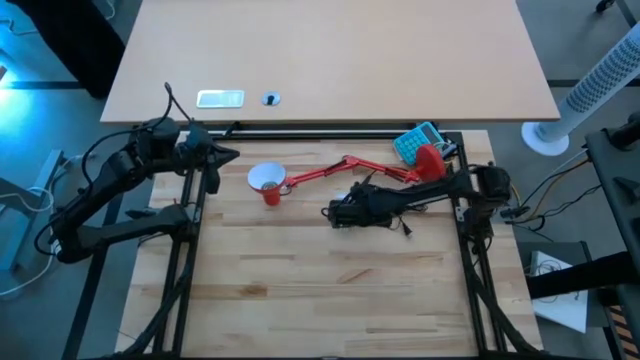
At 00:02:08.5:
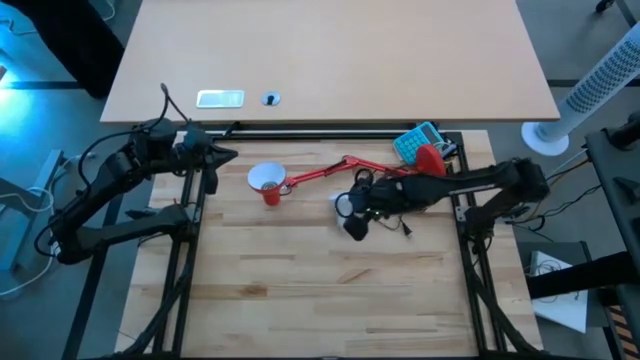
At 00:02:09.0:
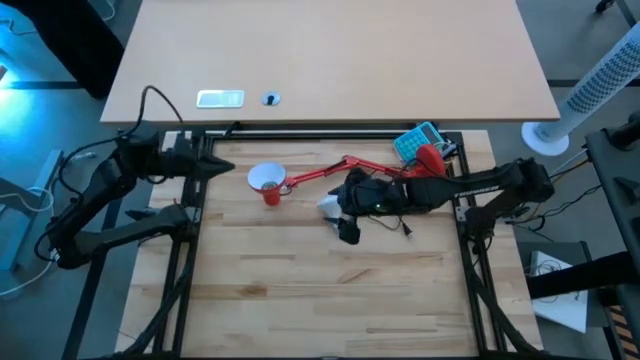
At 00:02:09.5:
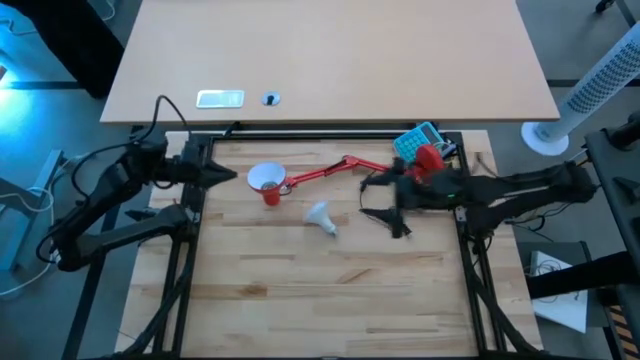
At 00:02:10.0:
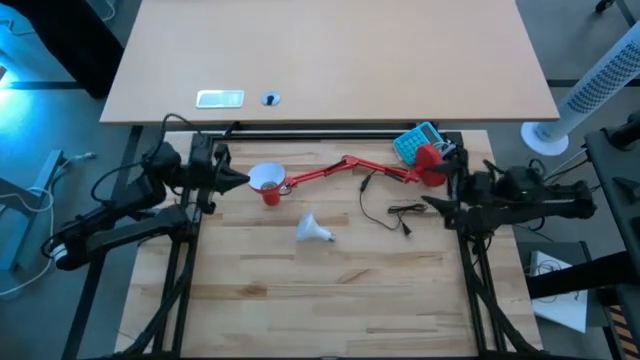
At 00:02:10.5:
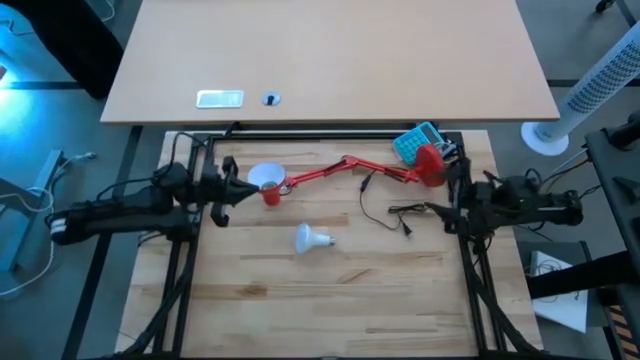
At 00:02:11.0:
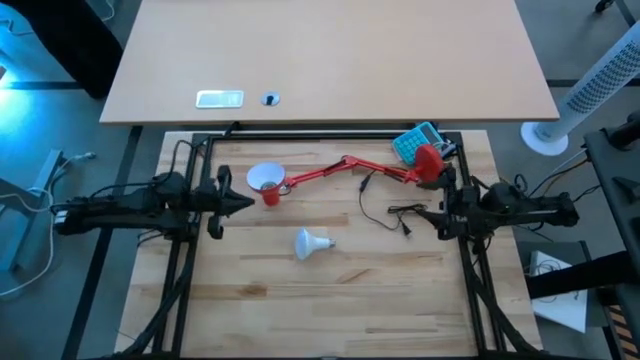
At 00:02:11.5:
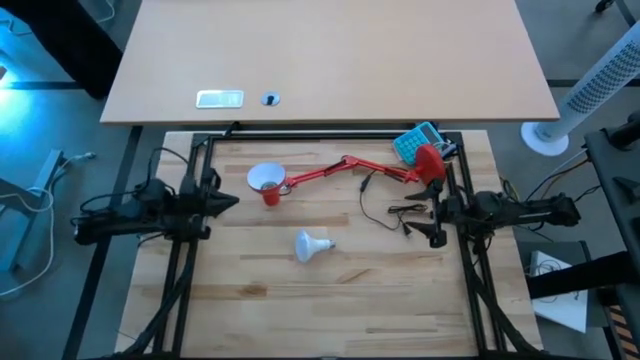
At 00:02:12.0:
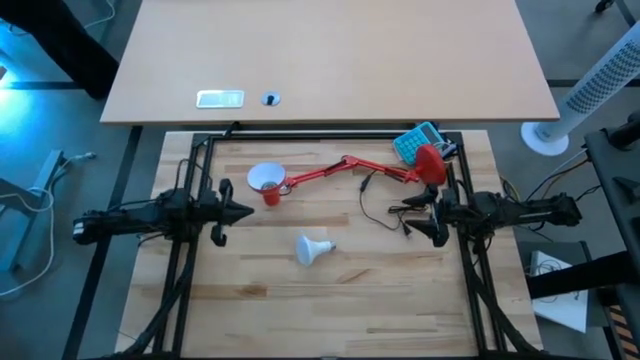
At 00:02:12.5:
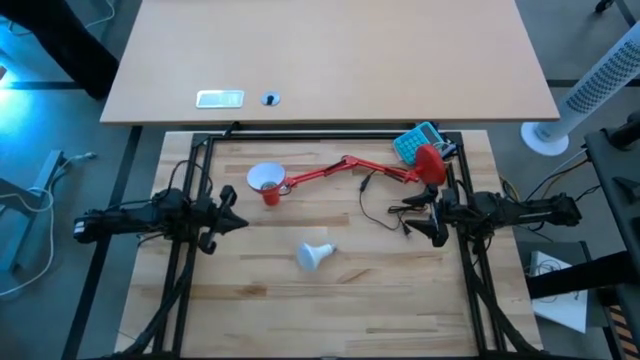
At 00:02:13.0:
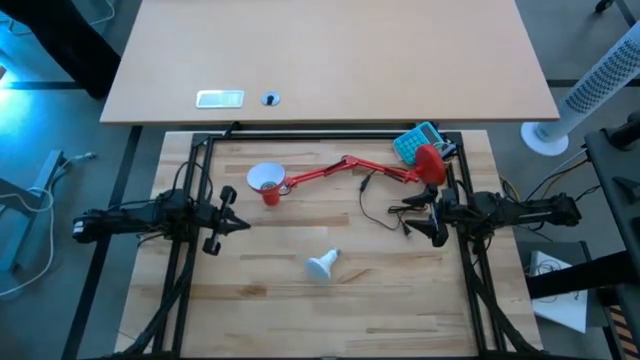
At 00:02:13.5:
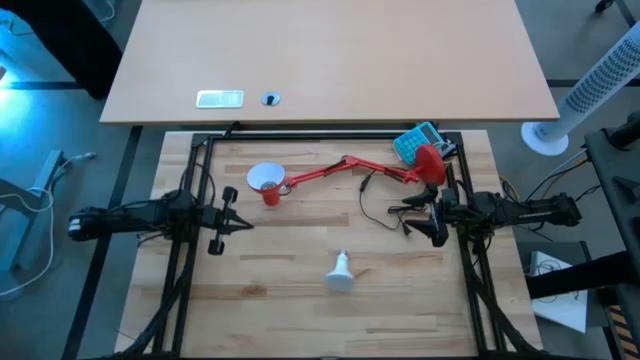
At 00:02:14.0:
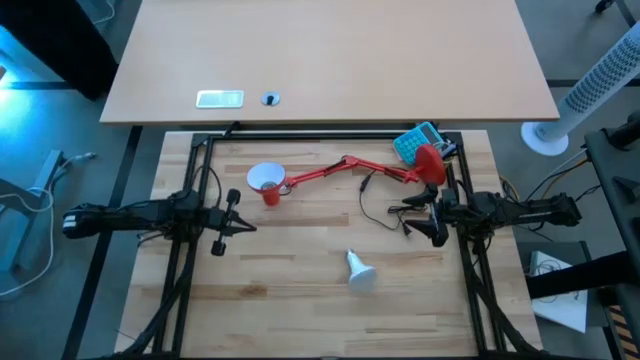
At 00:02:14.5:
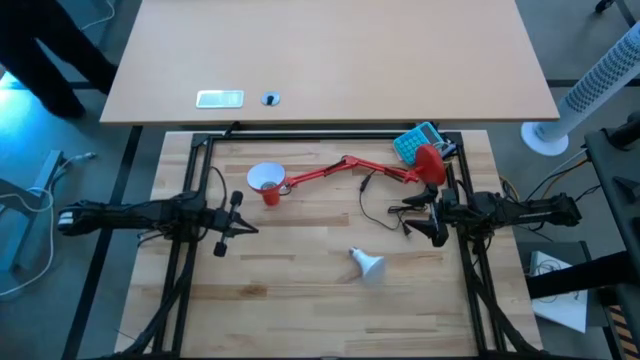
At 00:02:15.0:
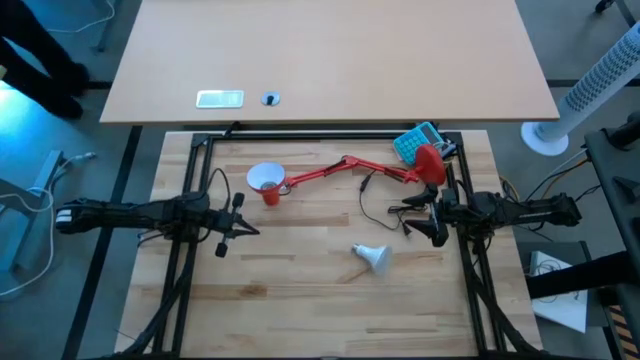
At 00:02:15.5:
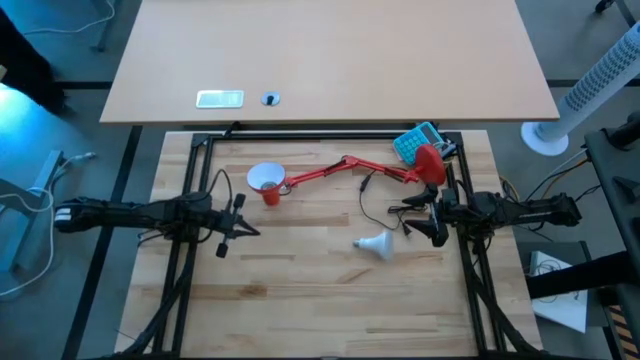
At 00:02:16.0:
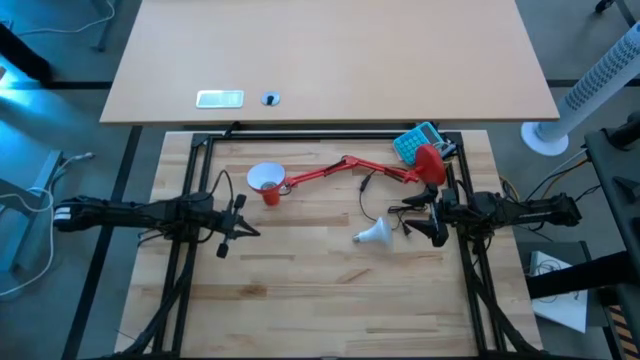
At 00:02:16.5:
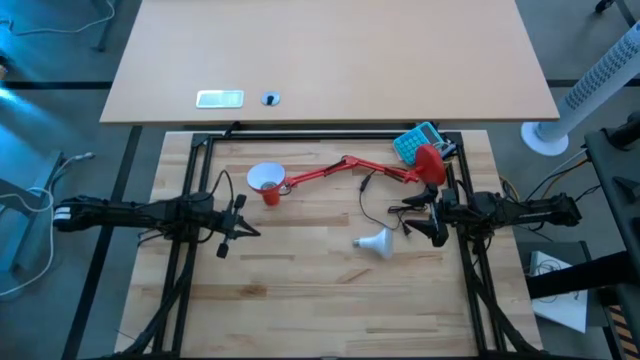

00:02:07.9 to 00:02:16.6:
Task: Screw lightbulb
Return to Home Position
